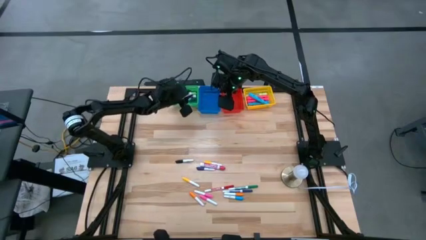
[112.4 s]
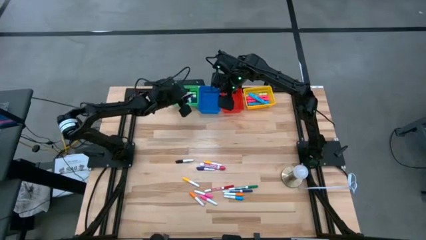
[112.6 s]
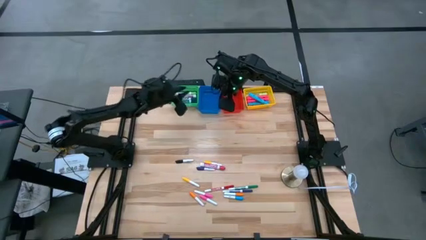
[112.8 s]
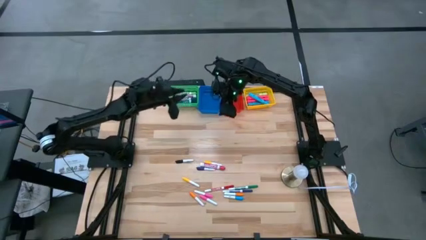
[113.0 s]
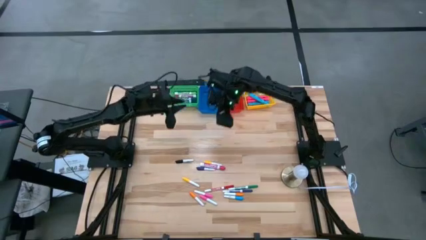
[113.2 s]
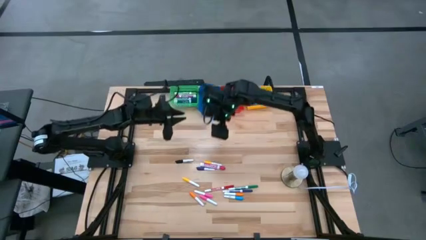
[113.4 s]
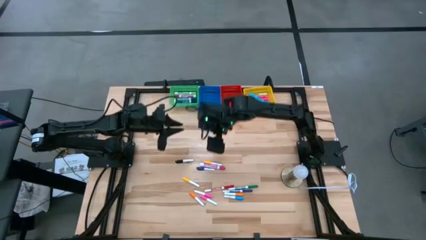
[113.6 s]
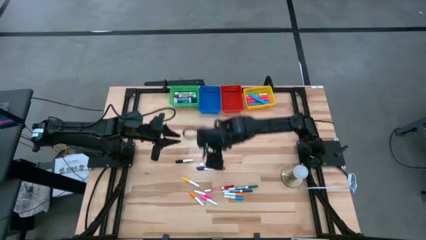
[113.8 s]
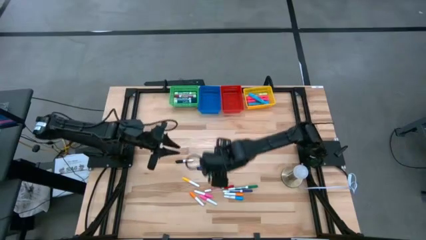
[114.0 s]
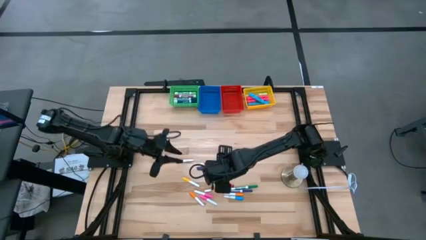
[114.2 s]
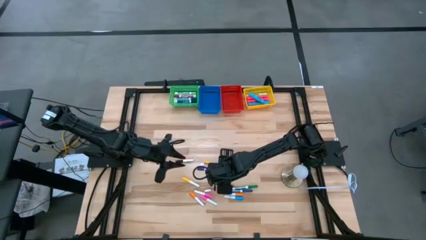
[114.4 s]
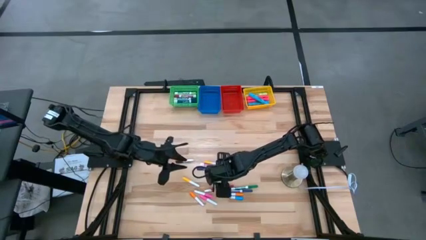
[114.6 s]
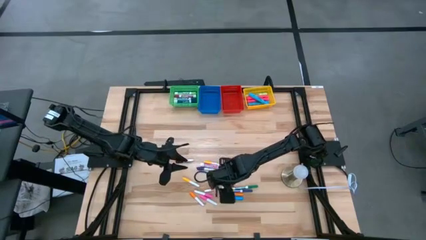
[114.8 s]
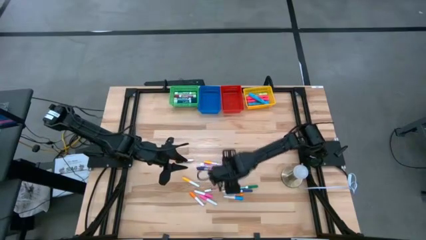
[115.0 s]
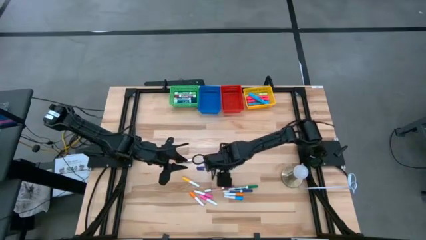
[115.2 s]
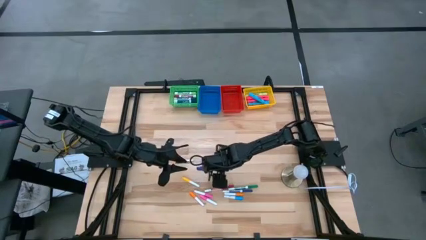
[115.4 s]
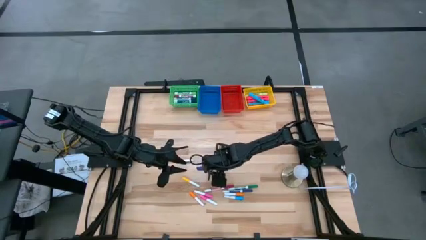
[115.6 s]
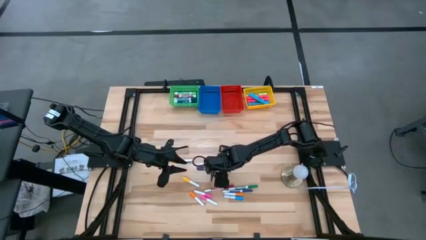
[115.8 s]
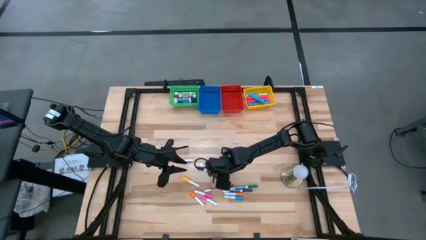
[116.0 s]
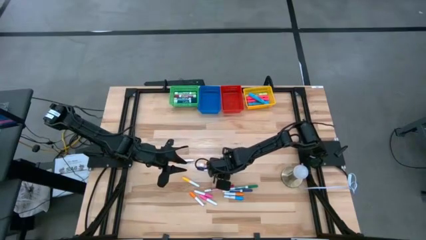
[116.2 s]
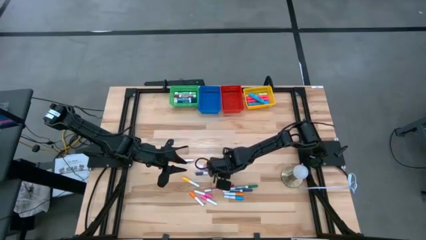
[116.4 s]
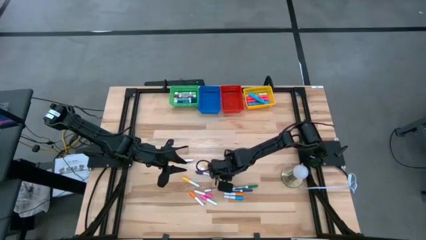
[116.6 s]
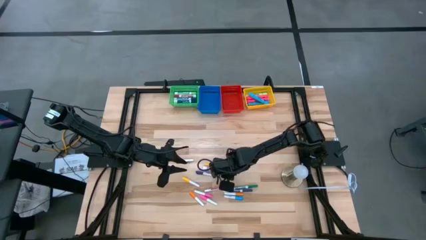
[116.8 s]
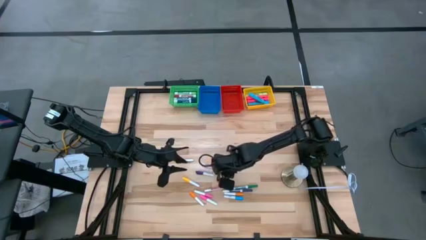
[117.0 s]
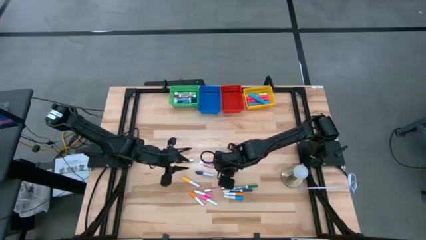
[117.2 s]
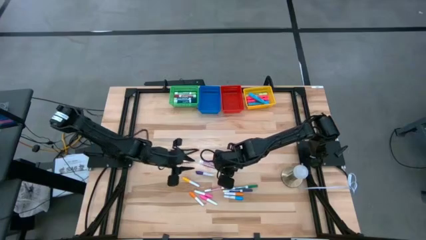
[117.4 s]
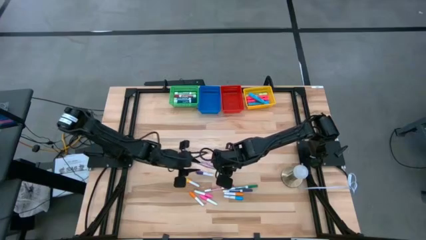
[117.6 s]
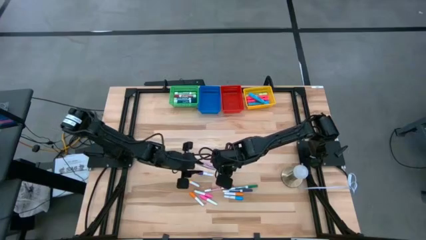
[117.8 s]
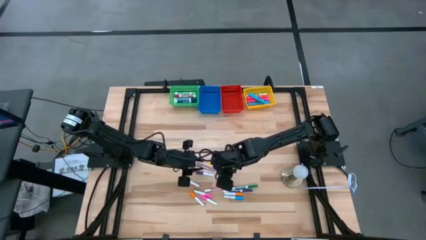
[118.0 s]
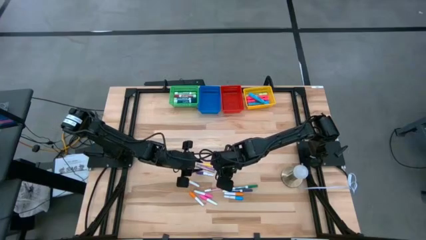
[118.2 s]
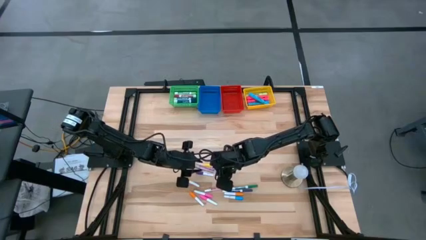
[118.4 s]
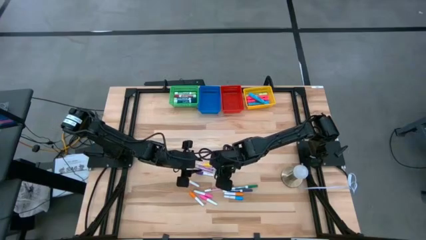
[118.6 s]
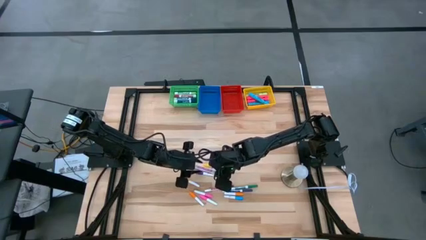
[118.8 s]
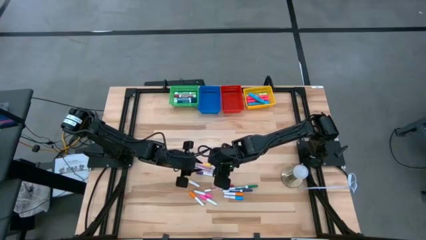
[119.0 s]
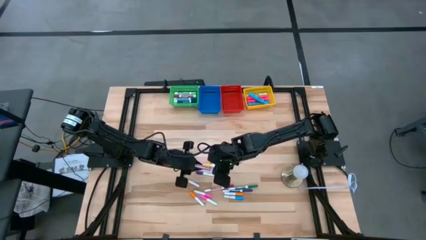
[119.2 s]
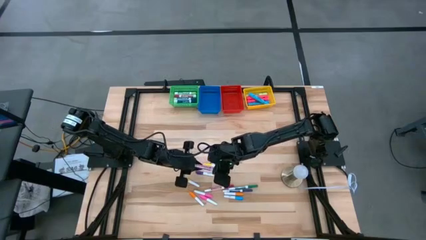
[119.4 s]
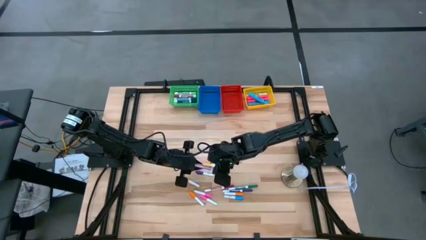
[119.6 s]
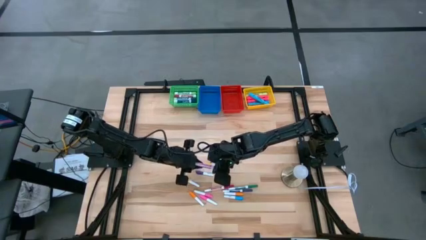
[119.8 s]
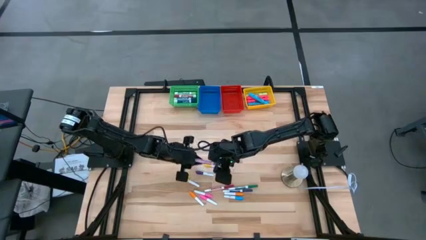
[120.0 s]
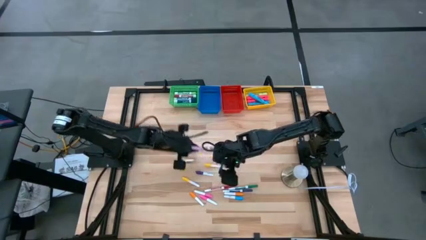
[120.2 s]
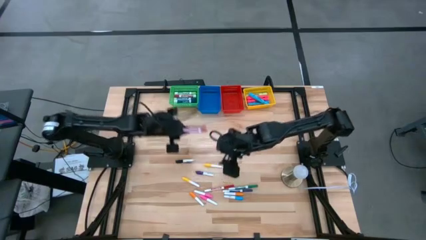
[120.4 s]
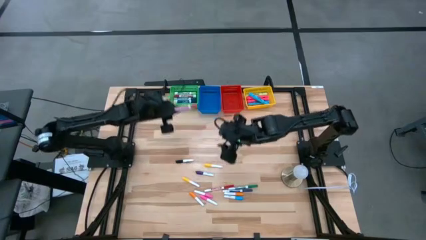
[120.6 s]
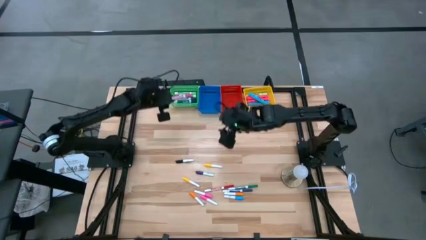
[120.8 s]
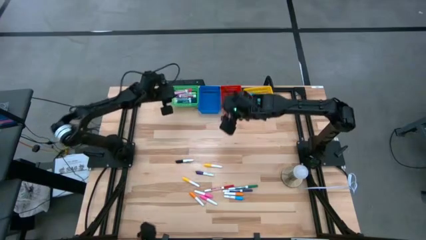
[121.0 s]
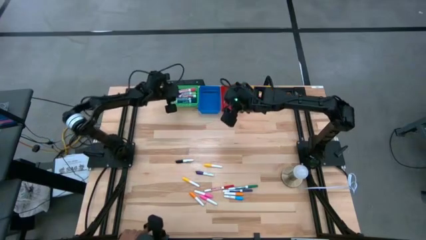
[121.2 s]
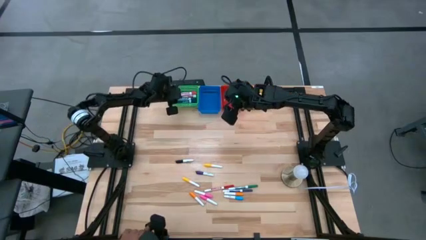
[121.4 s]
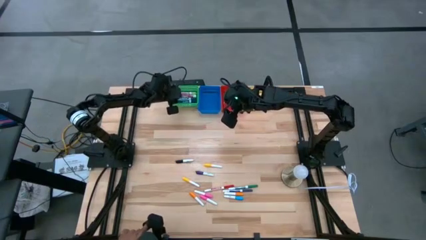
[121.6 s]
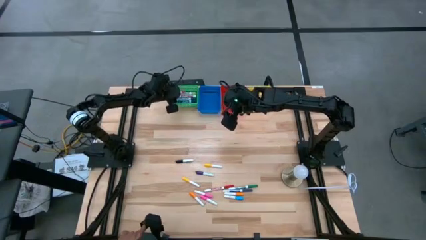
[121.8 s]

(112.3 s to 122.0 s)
Task: Pick & Place Markers
Put the large pink marker pen into the green bin

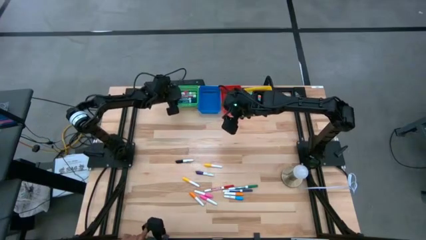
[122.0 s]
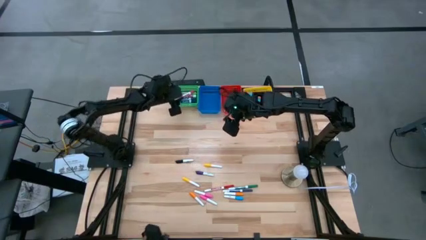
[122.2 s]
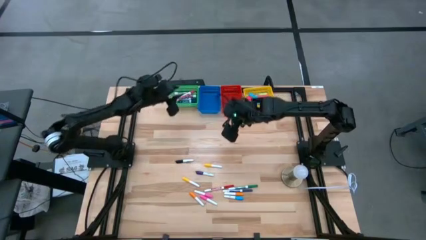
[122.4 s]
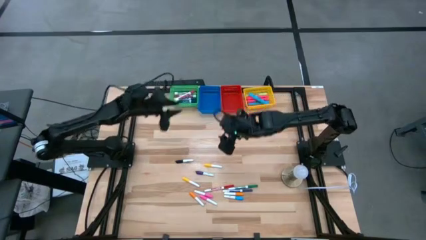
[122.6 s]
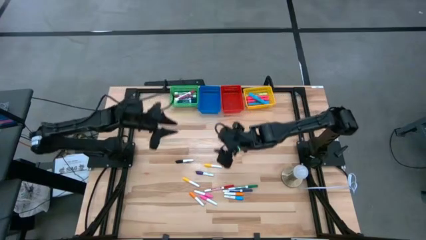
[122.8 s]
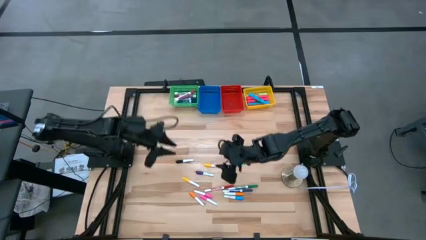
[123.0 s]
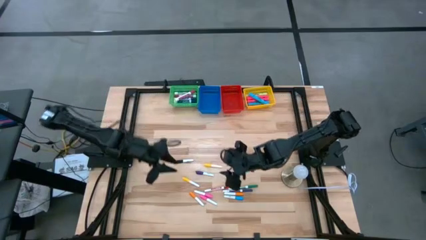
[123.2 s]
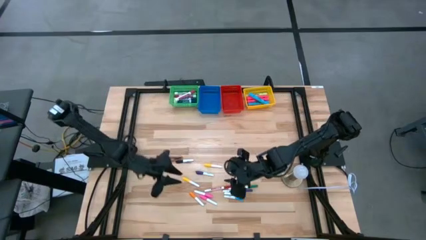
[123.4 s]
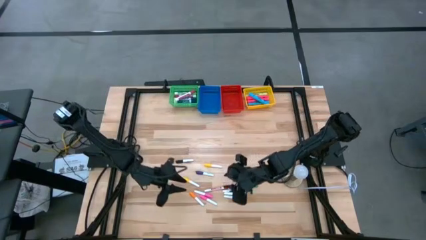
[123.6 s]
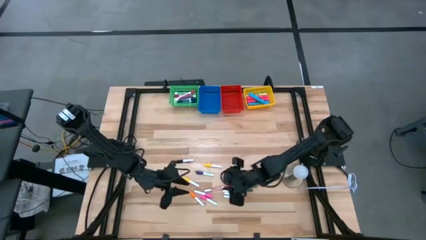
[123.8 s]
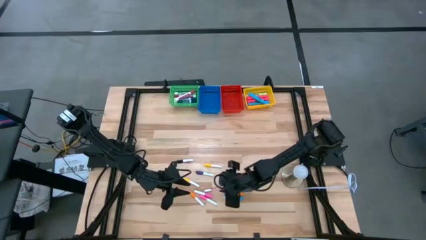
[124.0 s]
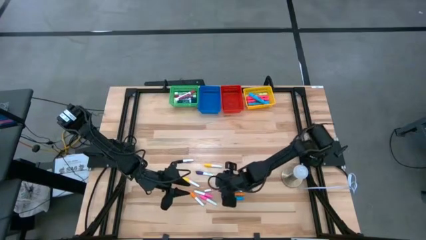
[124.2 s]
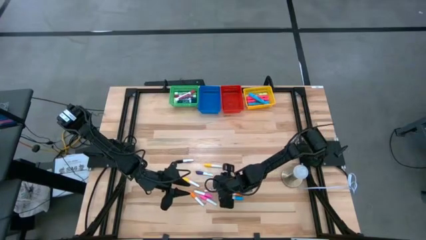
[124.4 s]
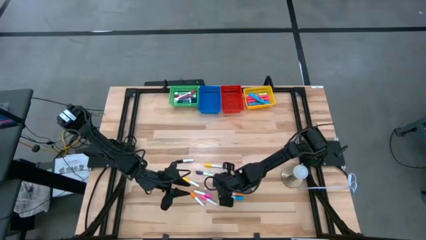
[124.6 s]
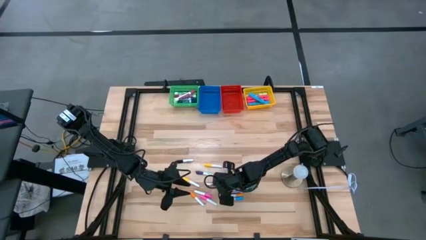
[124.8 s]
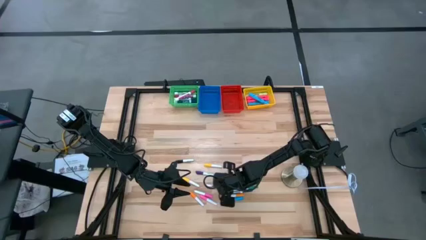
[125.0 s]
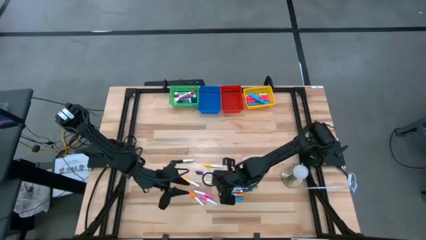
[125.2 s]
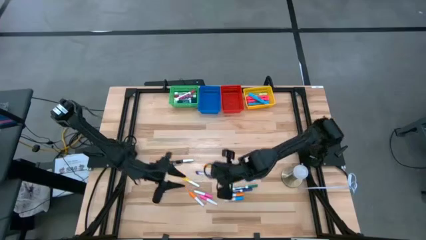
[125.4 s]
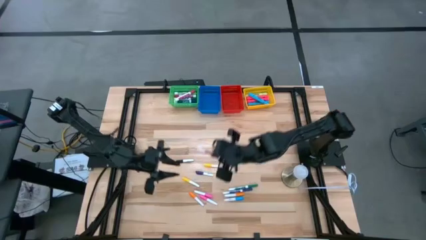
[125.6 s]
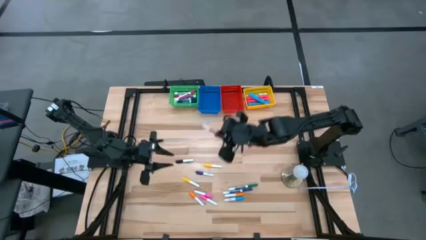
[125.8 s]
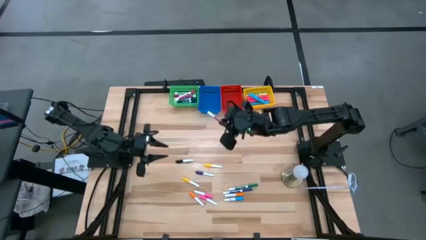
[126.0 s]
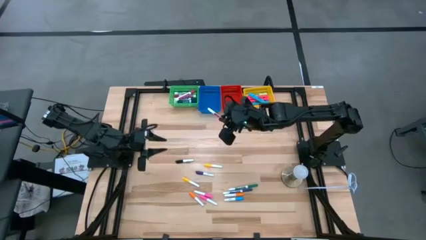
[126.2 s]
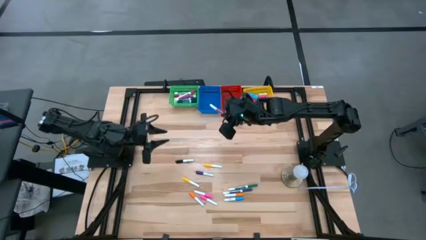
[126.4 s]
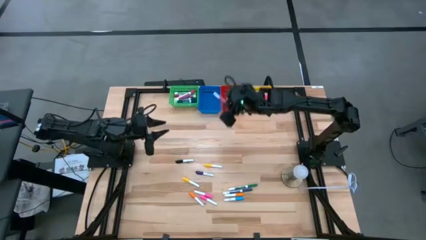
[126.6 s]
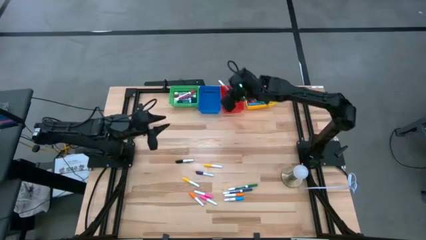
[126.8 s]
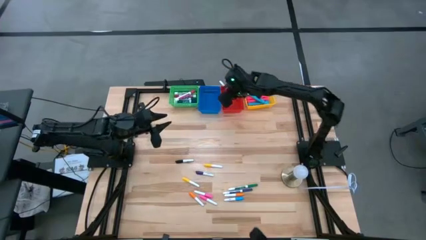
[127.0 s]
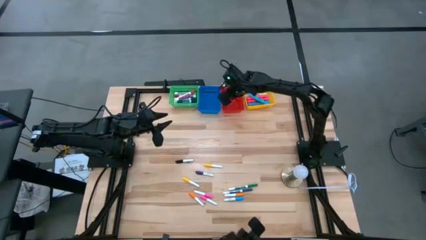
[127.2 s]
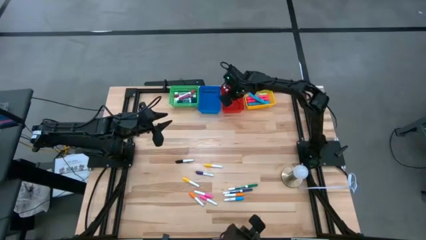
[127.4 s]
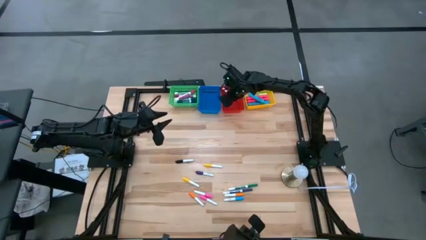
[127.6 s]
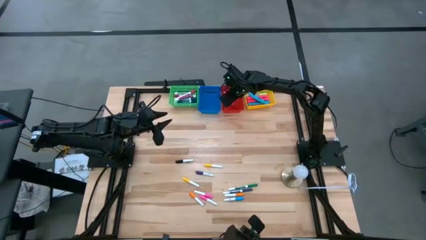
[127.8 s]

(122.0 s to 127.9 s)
Put the small red marker pen into the red bin
